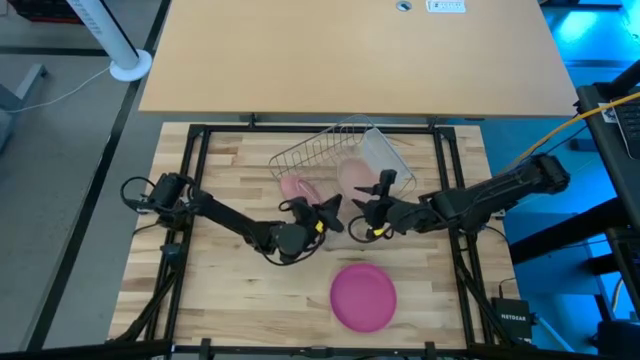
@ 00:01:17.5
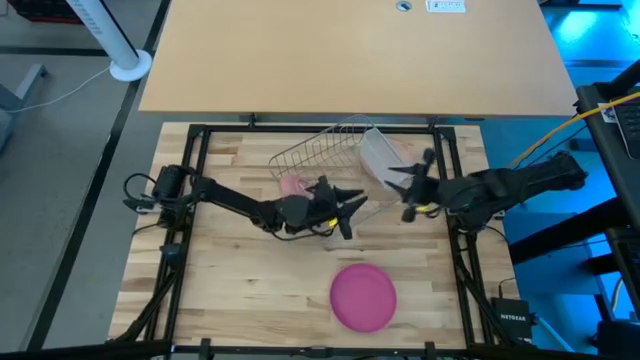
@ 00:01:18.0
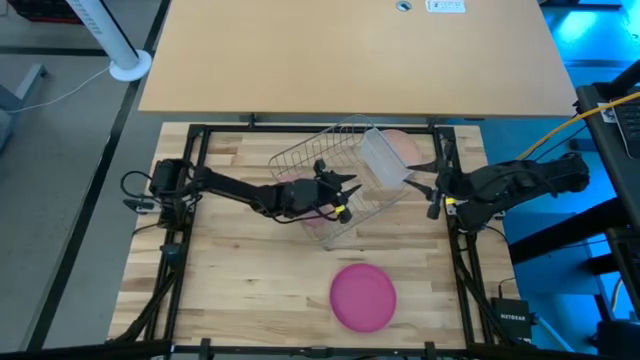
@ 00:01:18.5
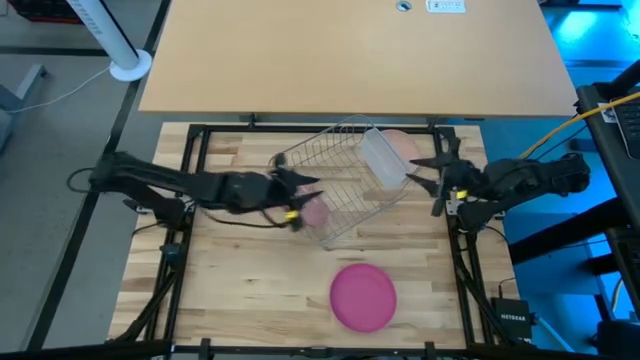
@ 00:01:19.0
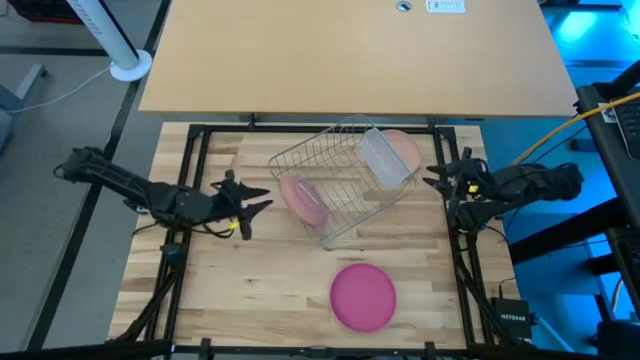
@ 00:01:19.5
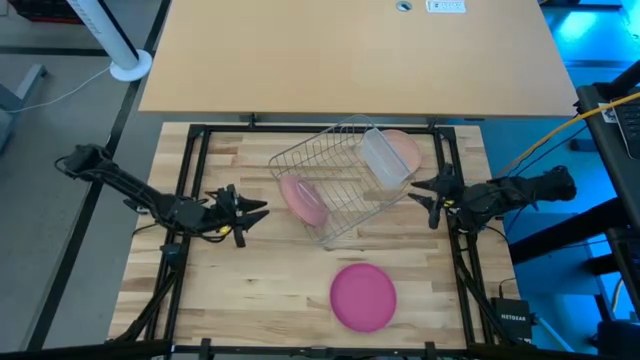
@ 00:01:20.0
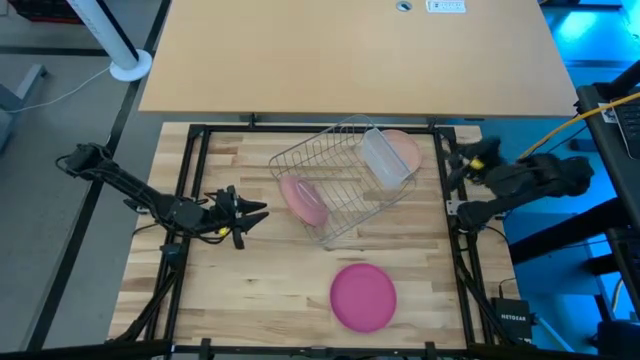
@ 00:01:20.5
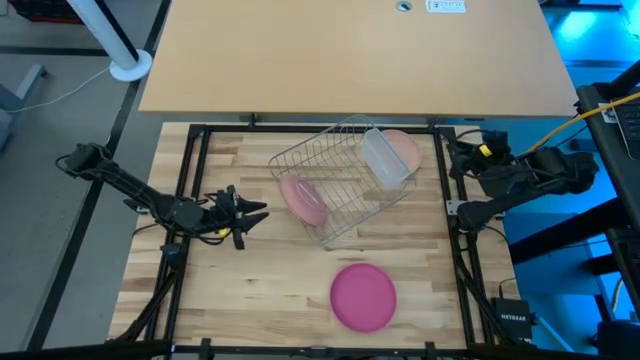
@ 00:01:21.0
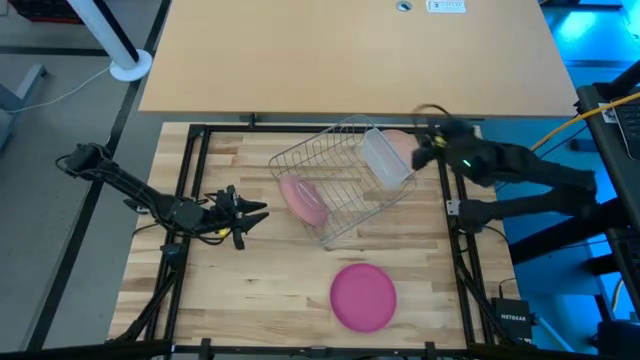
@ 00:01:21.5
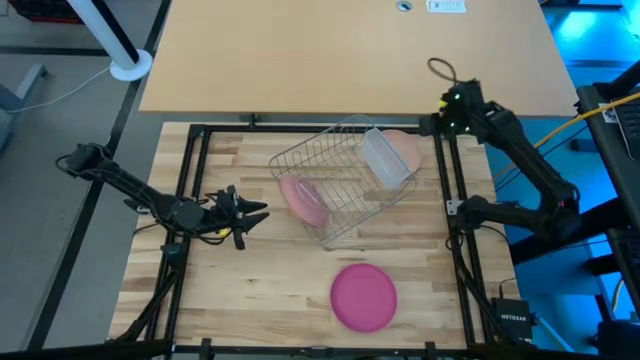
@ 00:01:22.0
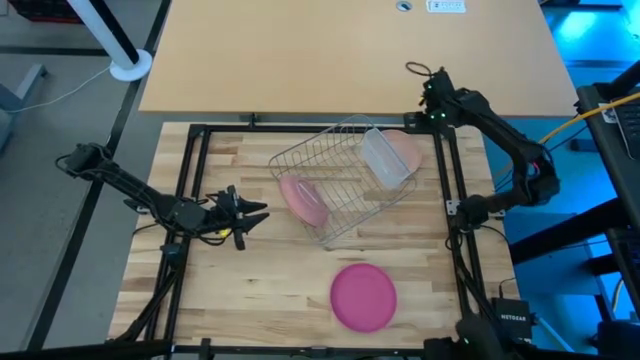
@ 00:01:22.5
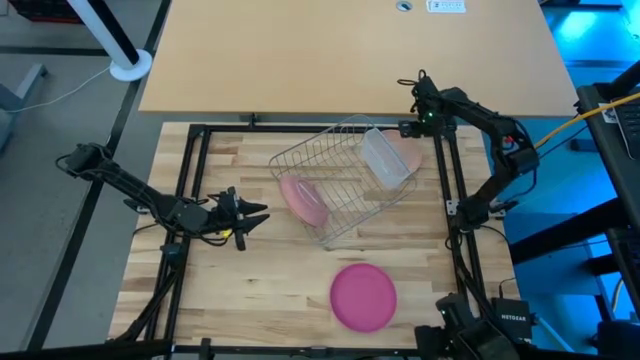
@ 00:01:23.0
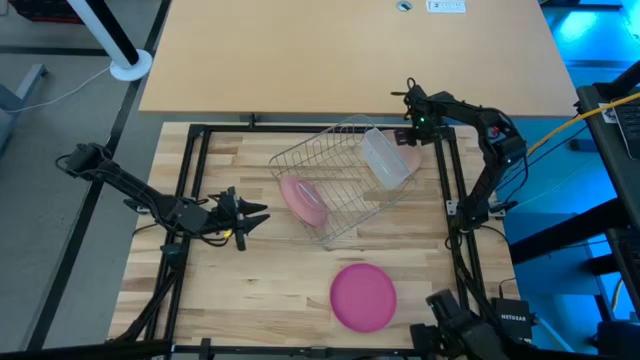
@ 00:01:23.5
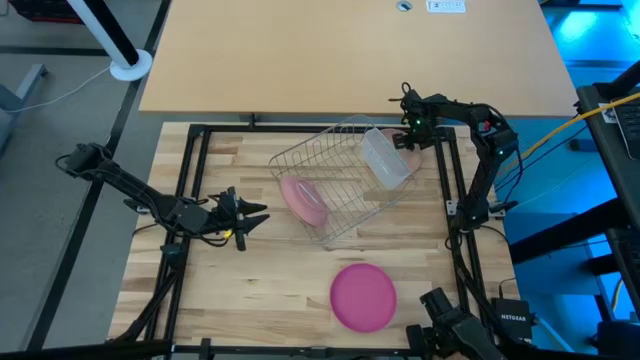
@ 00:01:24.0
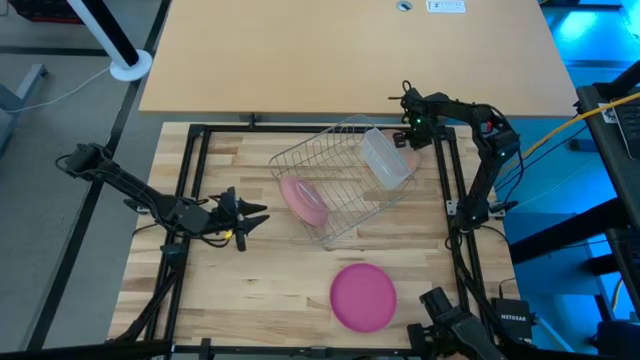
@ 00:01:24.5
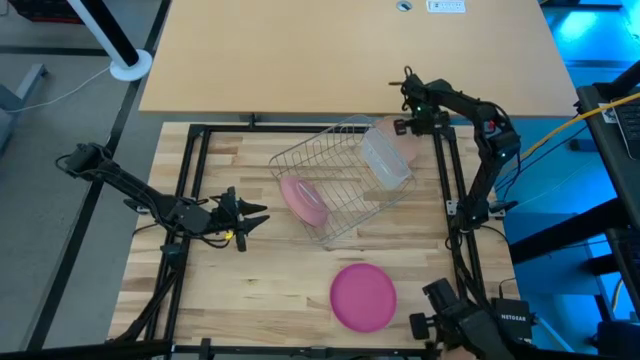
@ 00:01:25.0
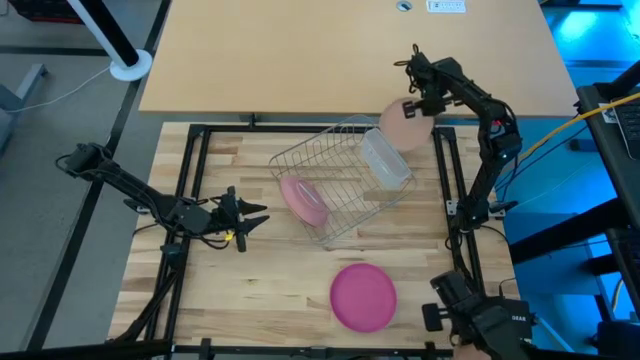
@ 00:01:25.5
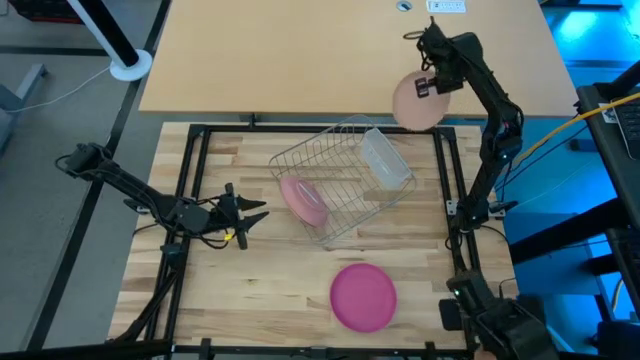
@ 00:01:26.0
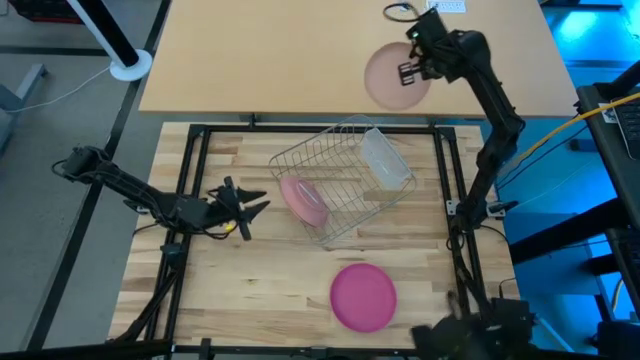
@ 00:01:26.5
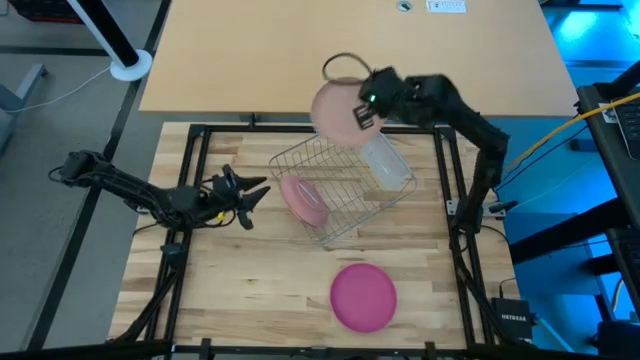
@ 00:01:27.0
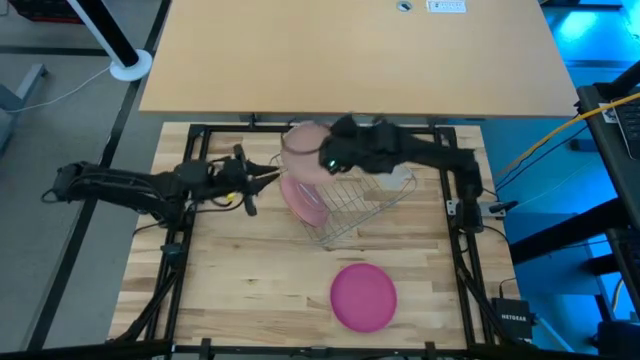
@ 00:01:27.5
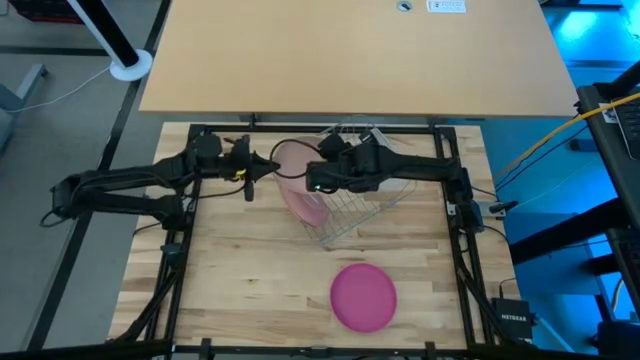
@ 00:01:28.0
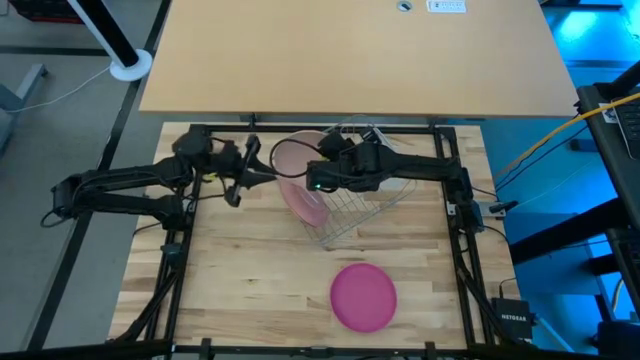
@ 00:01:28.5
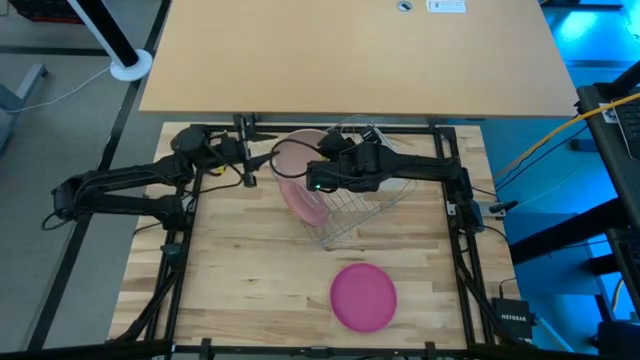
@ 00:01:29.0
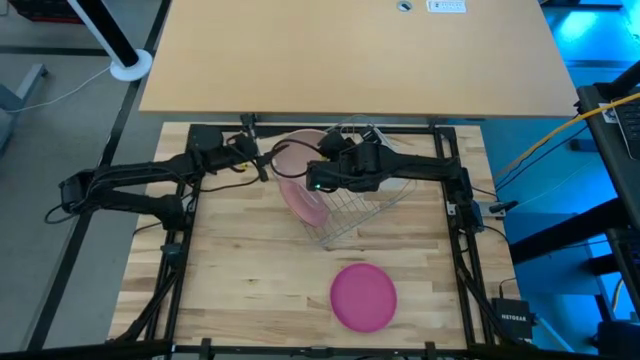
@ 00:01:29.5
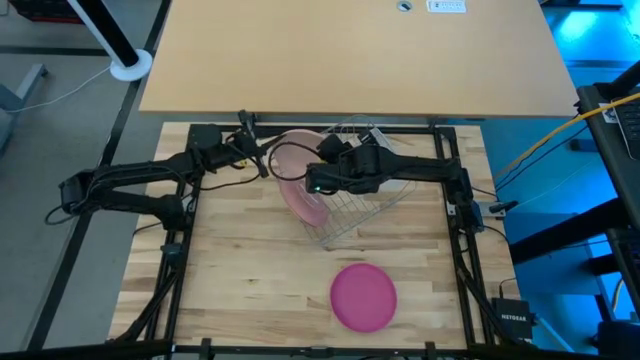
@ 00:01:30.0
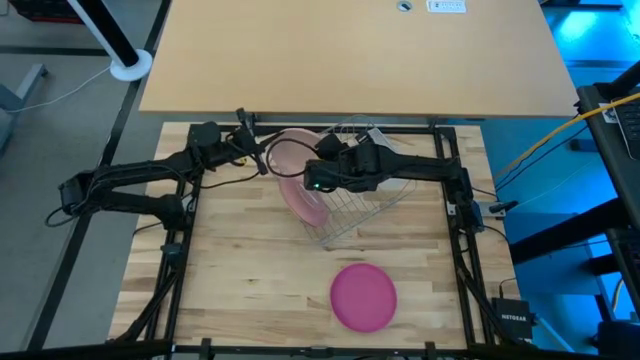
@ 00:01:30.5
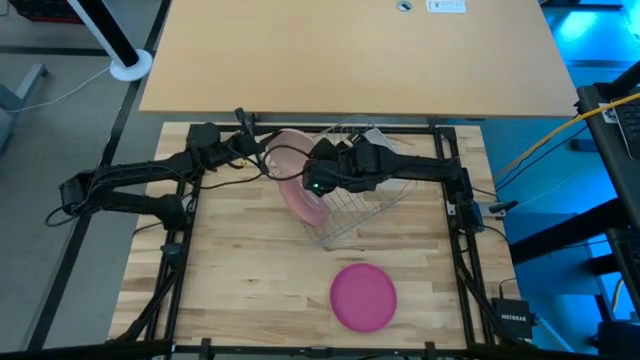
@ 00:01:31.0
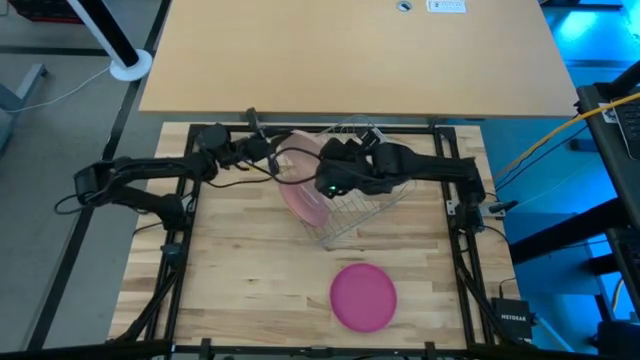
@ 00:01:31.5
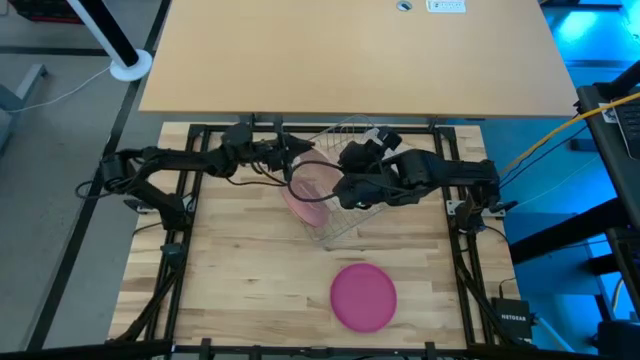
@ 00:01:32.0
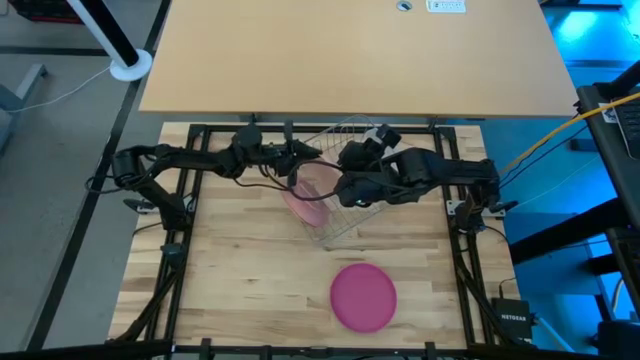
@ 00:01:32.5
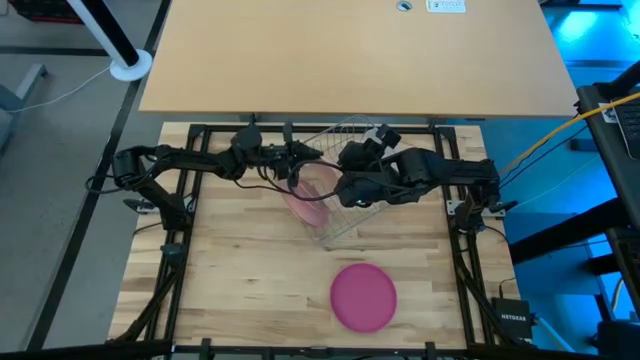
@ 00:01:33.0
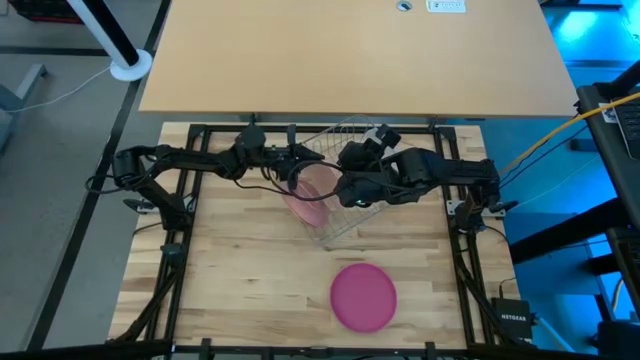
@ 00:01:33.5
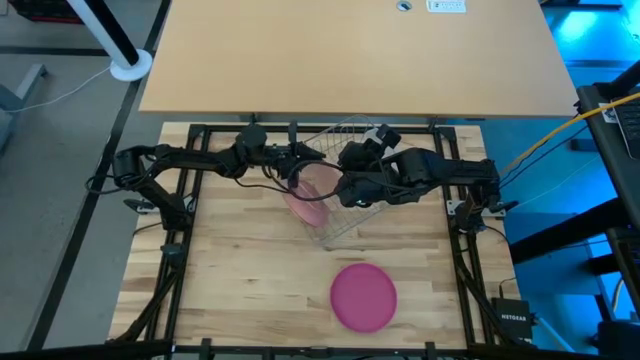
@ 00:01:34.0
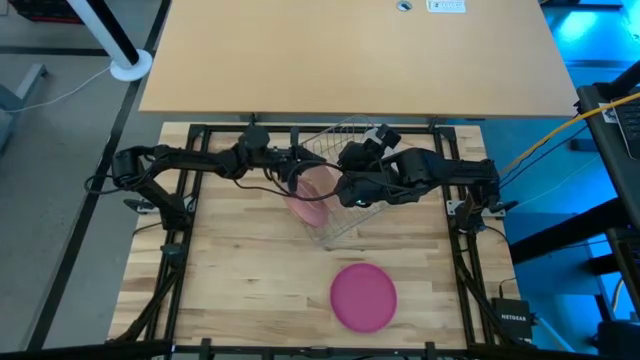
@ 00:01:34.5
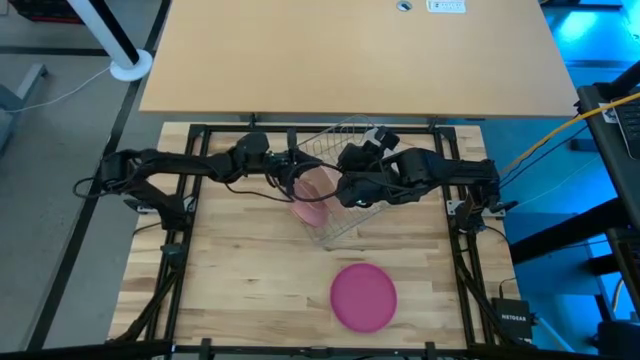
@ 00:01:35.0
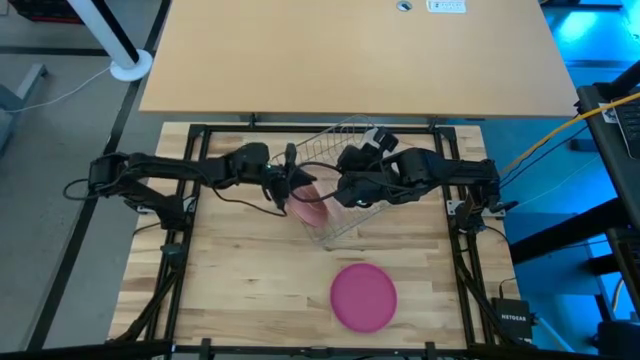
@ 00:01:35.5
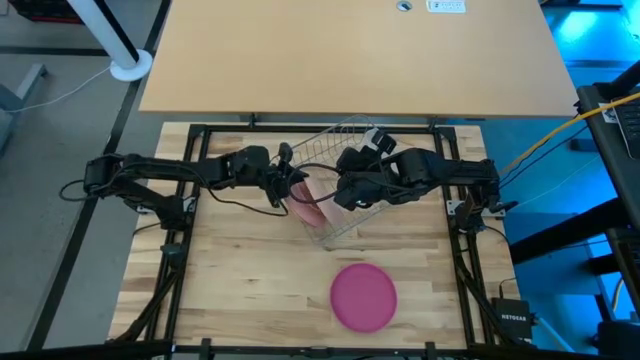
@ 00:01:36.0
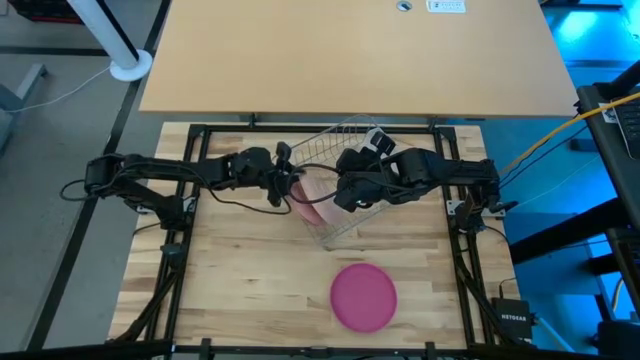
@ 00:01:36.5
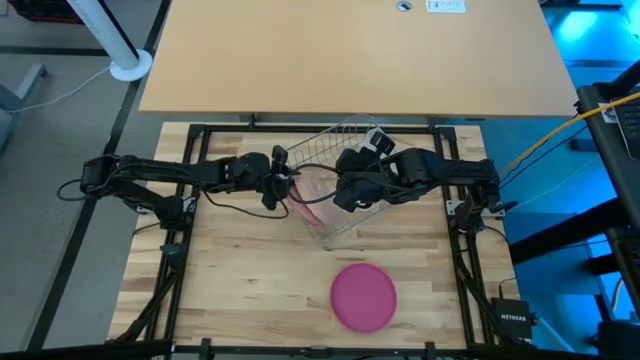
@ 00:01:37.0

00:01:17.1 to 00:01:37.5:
Task: Sort dishes
Put the light brown plate into the dish rack
